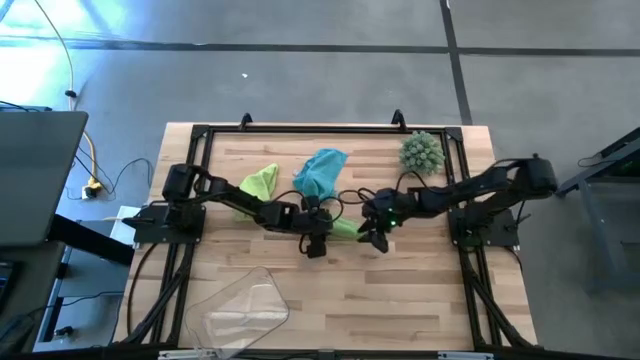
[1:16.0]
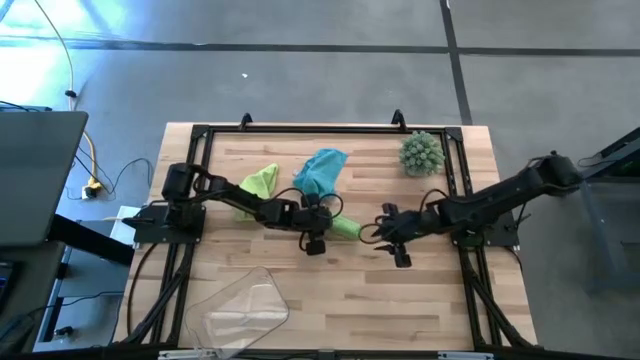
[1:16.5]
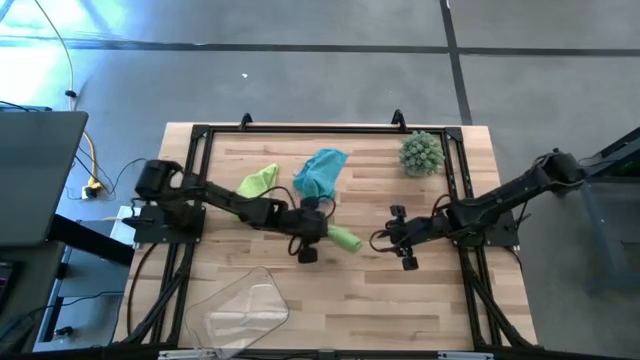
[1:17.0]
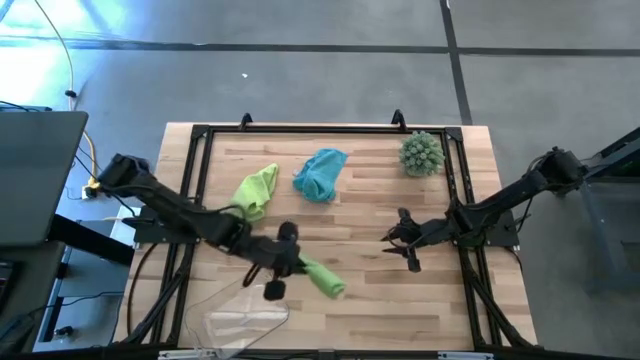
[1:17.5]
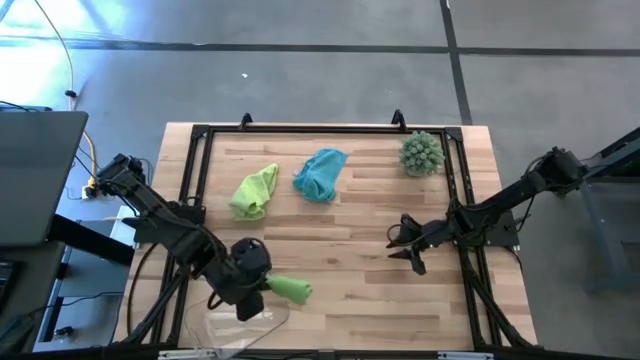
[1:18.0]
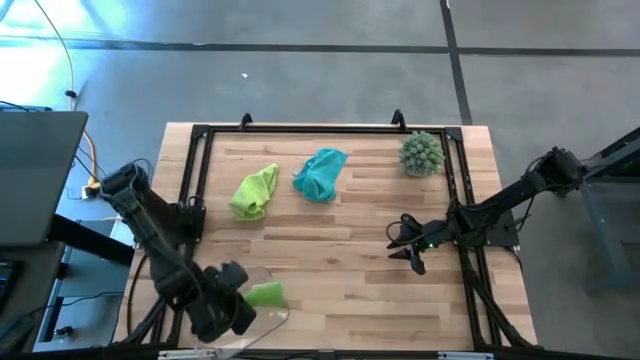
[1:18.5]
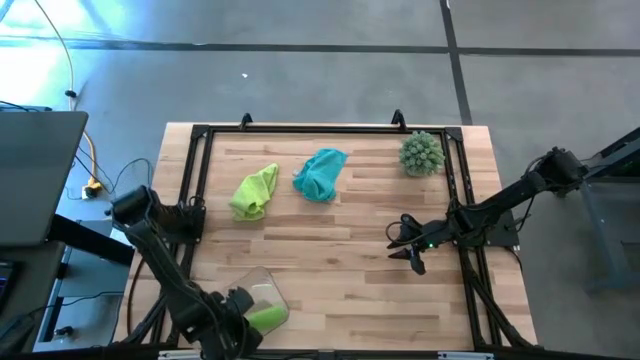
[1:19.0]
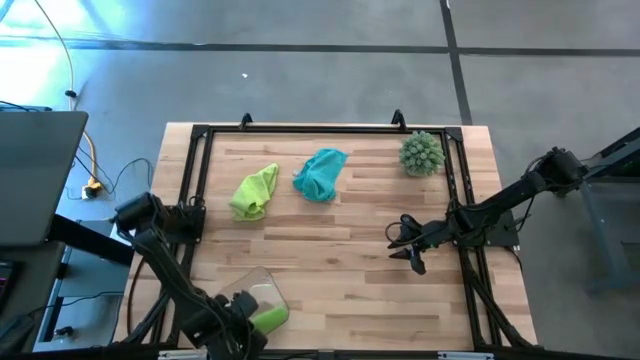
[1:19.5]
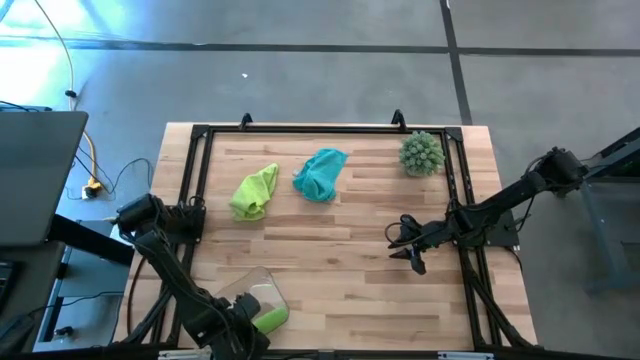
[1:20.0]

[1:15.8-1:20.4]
Task: Roll microfiber towels into tight, uniform cylinder then place into a basket
Put the right green microfiber cloth into the transparent bin

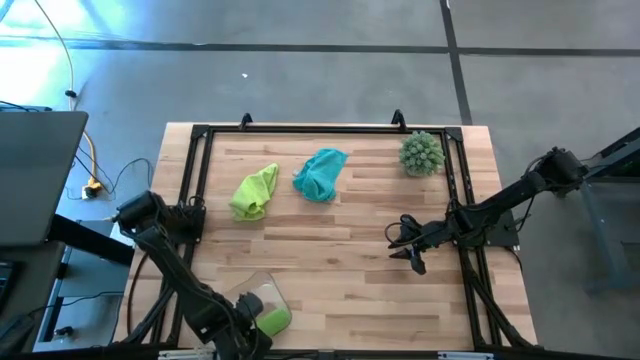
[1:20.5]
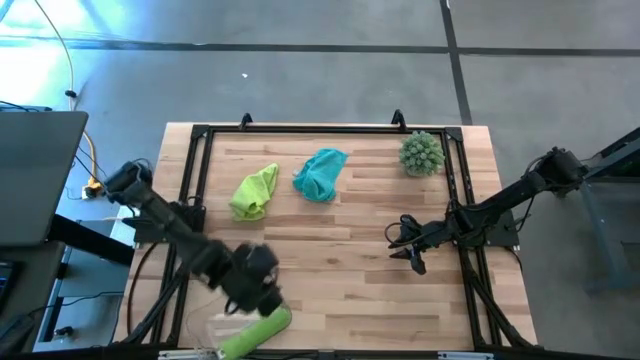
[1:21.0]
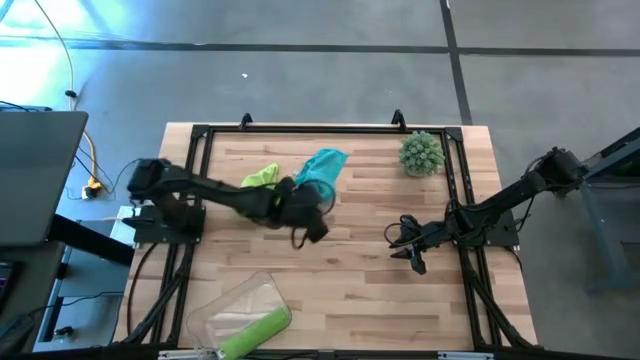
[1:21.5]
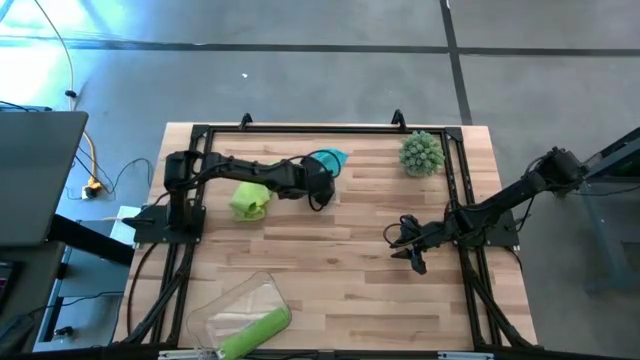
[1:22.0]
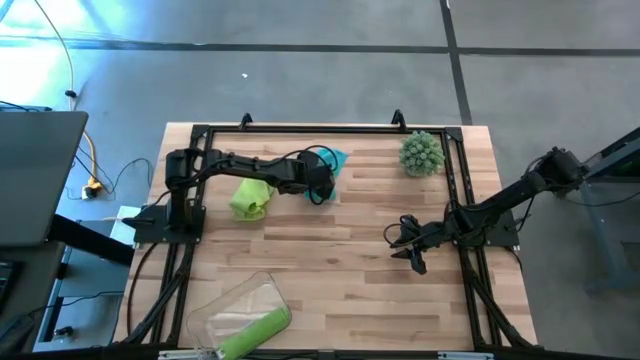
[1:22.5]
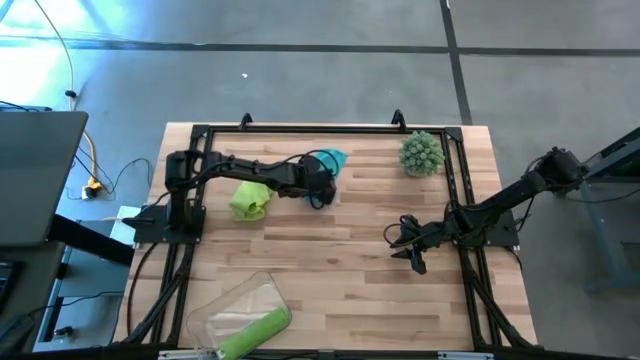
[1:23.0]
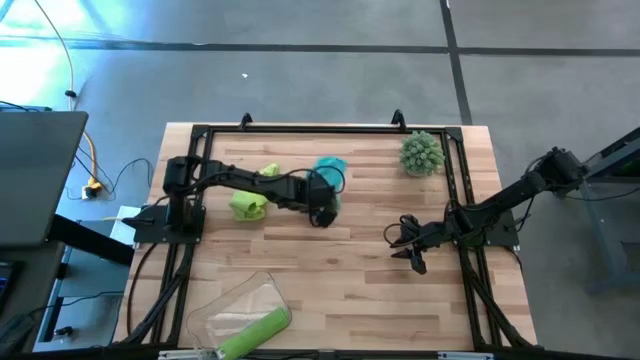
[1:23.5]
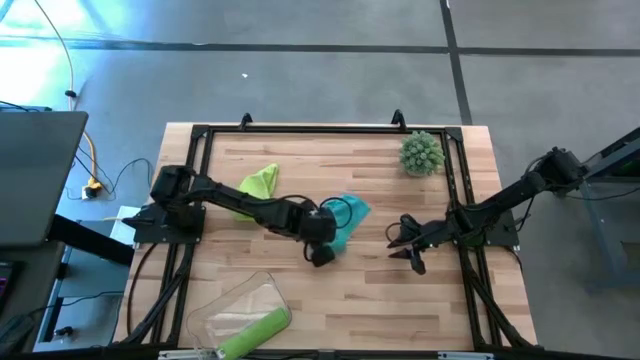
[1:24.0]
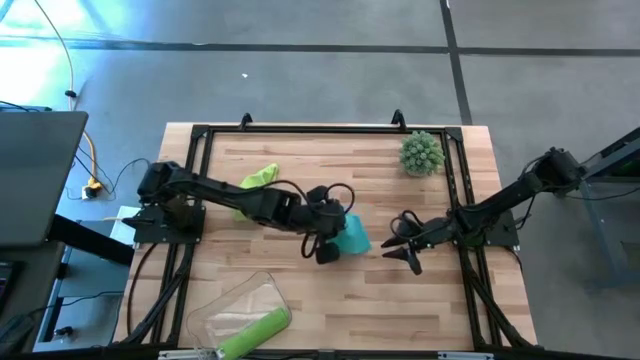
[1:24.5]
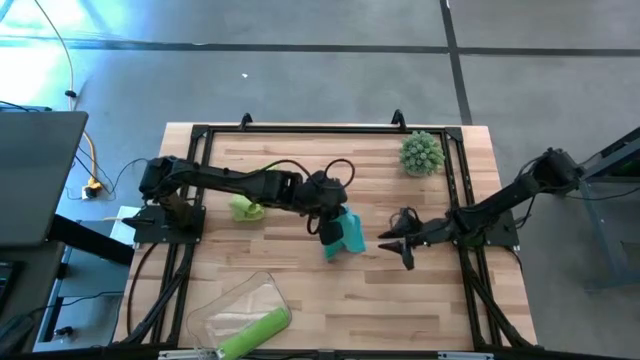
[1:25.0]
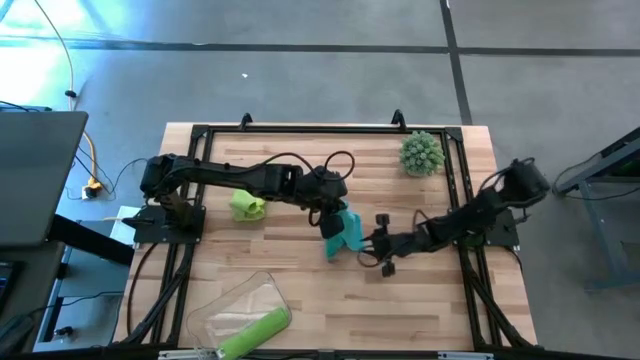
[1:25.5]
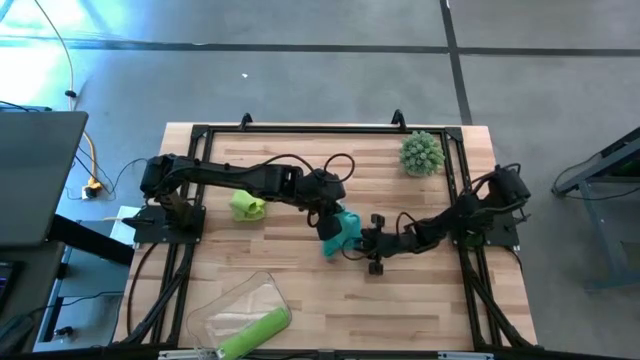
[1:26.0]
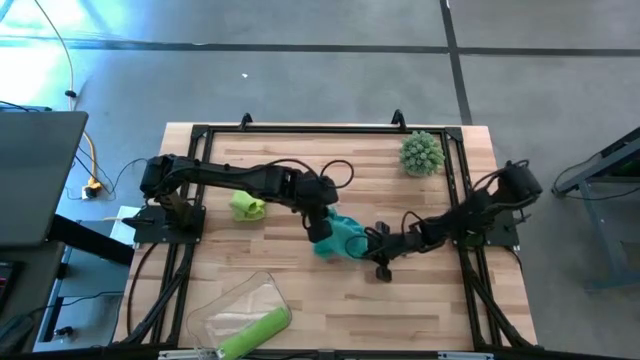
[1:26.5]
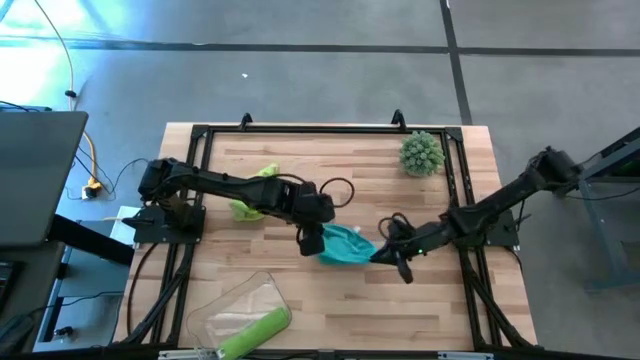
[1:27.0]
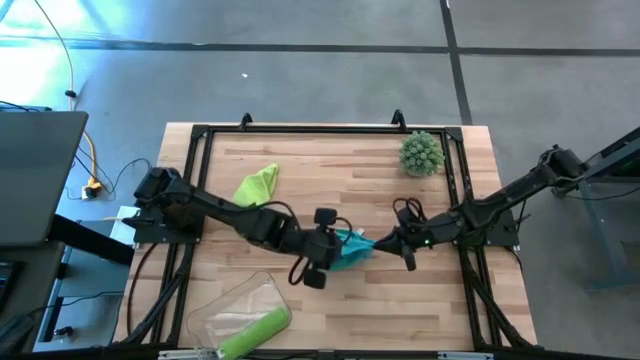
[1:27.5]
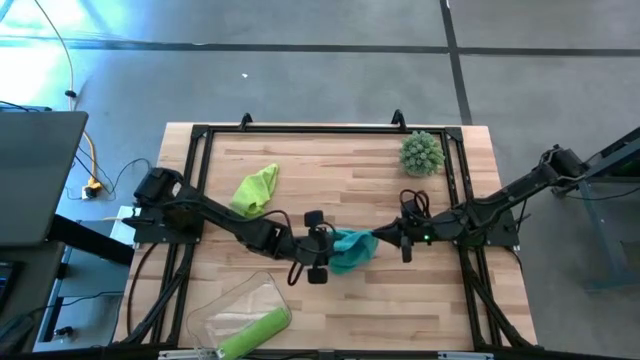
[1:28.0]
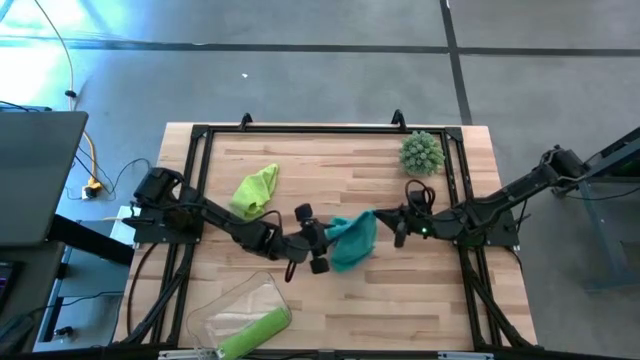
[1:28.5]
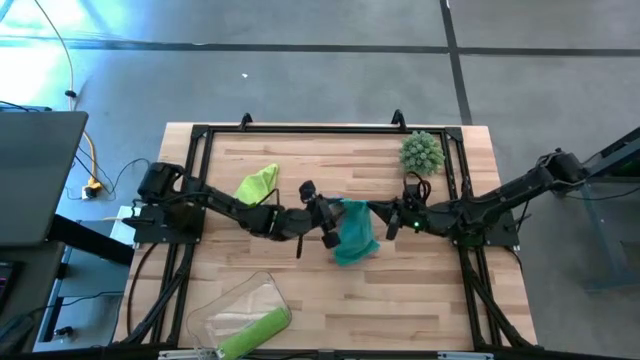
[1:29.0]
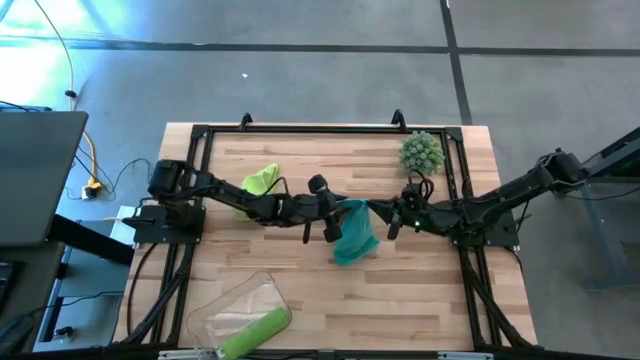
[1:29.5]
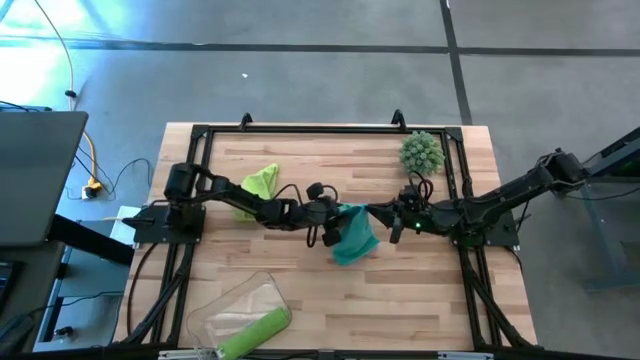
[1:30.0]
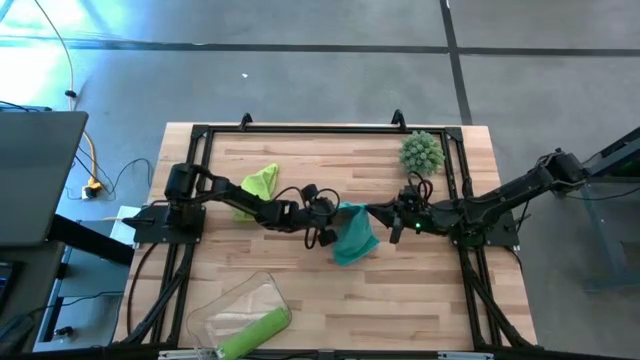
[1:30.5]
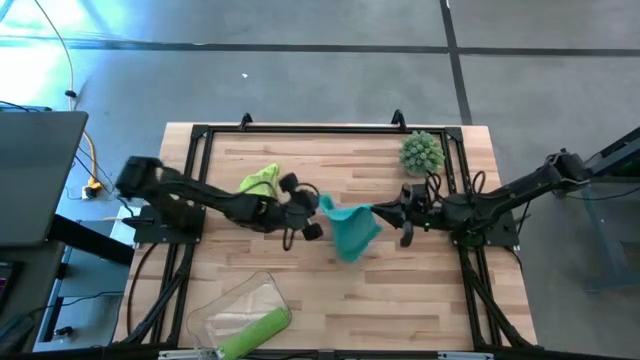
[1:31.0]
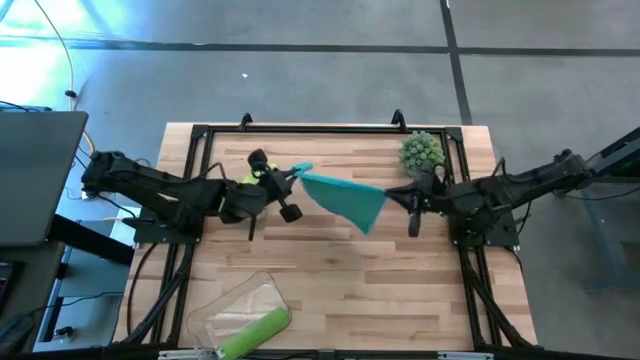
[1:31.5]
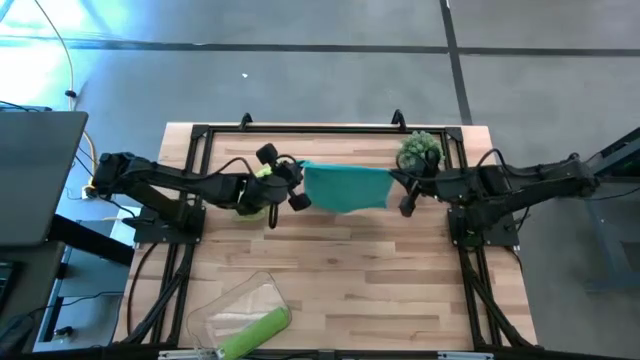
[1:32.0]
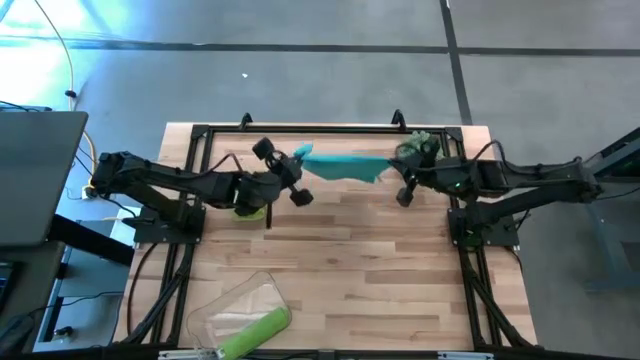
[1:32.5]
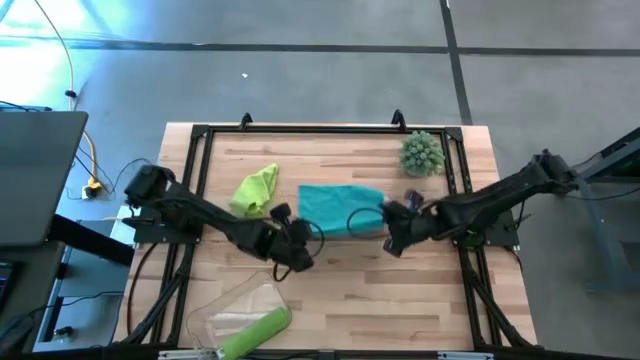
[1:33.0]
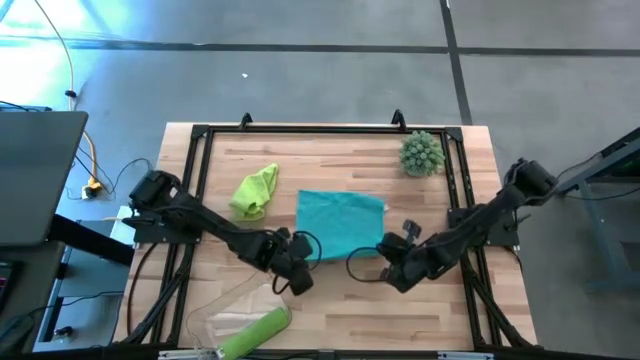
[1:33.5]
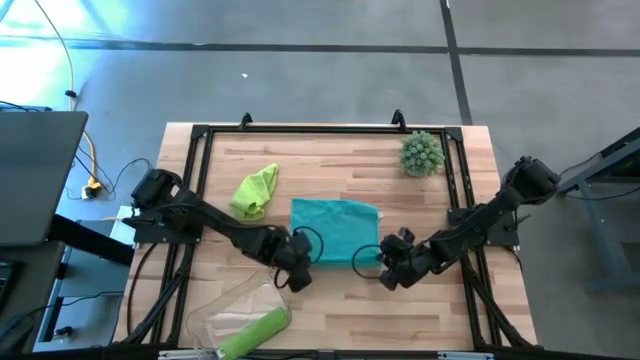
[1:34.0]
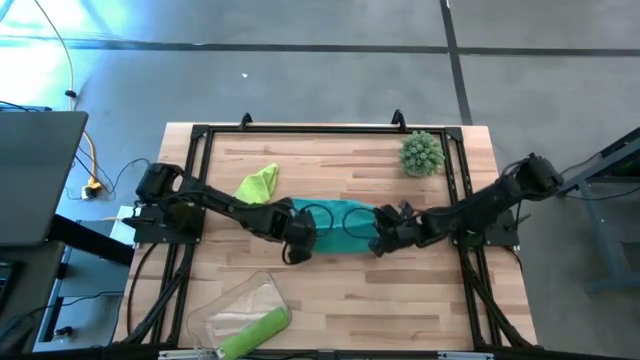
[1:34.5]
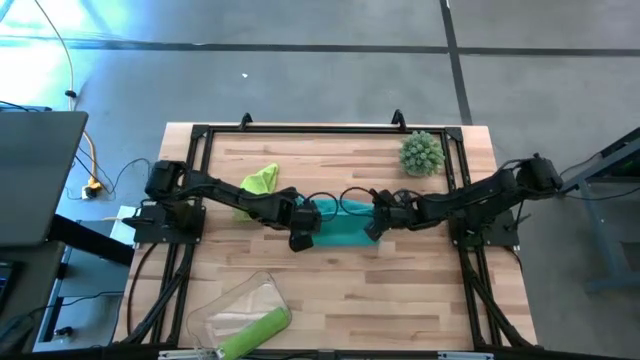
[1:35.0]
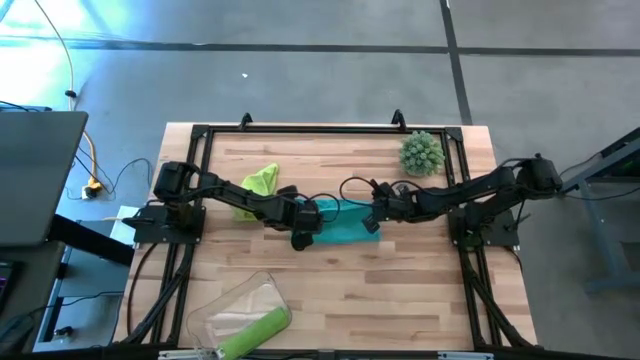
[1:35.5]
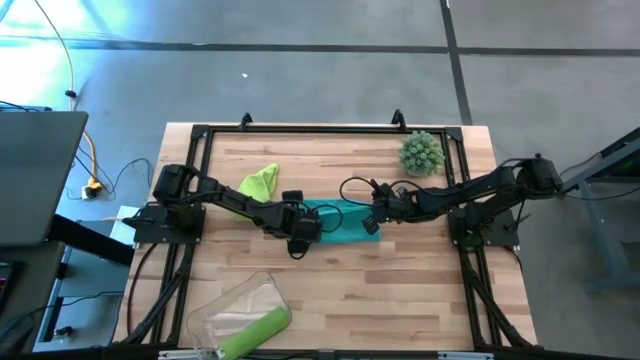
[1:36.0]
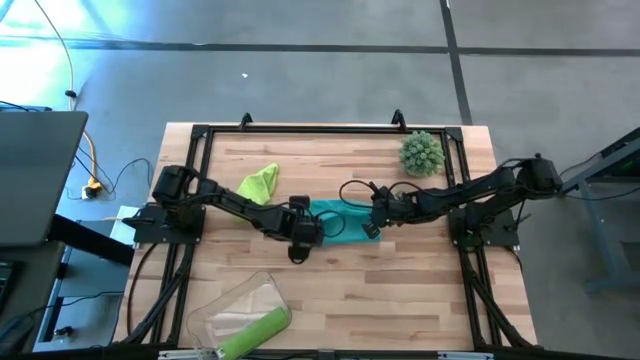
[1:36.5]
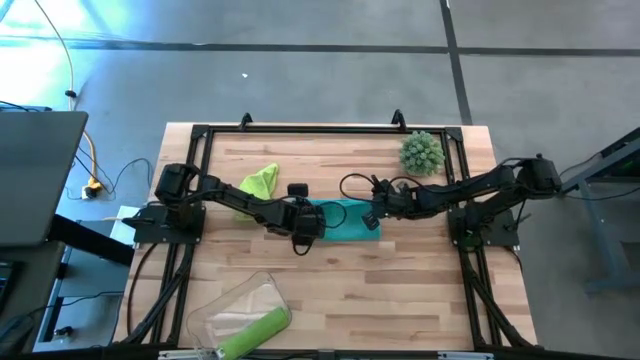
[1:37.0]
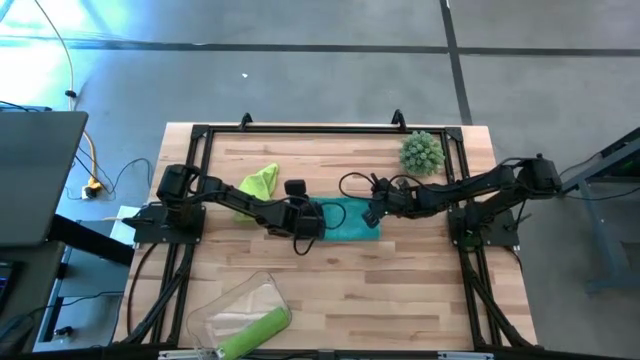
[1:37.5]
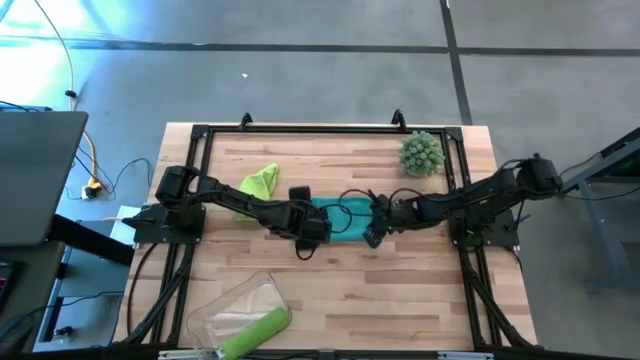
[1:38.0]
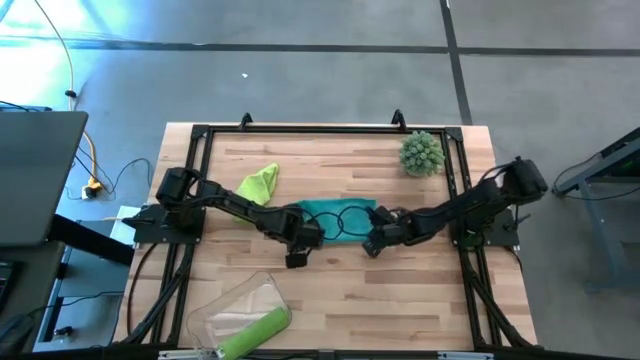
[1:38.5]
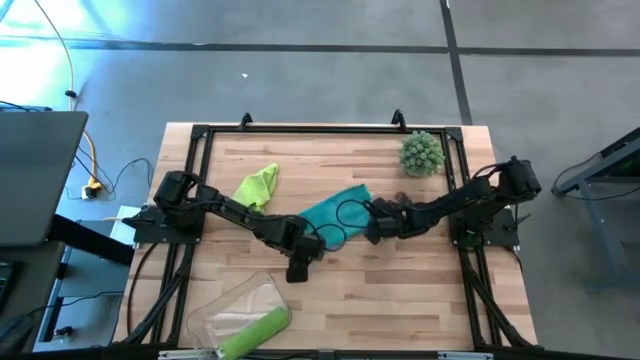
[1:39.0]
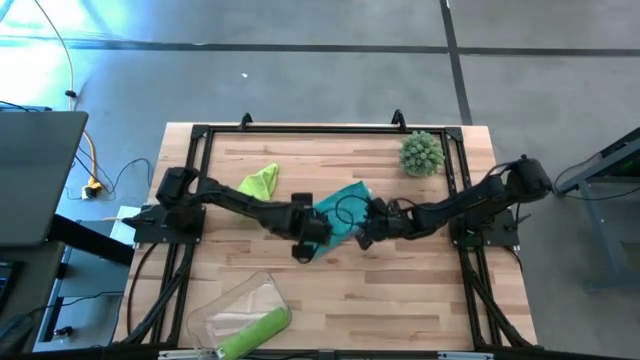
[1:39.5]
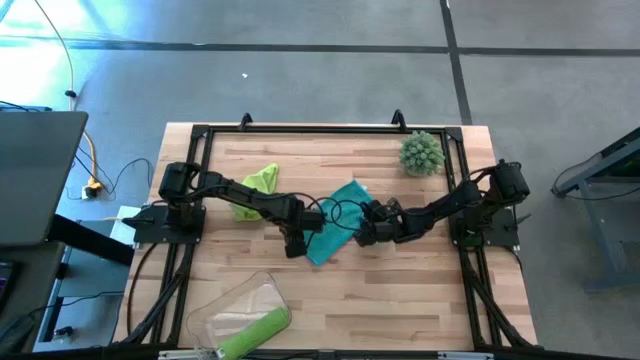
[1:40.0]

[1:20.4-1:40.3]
Roll the blue microfiber cloth
